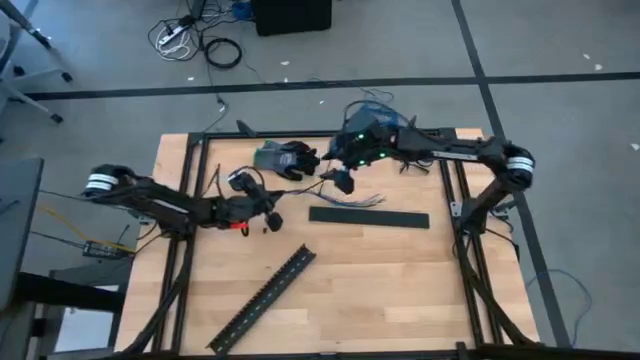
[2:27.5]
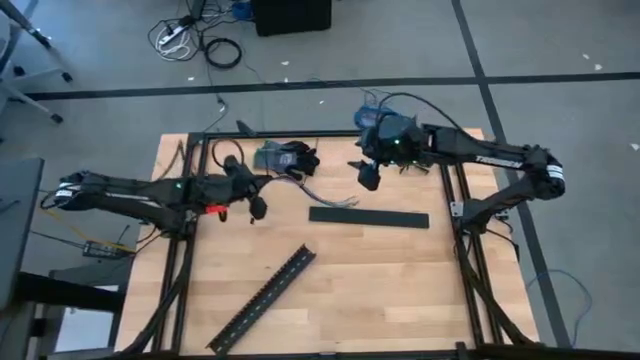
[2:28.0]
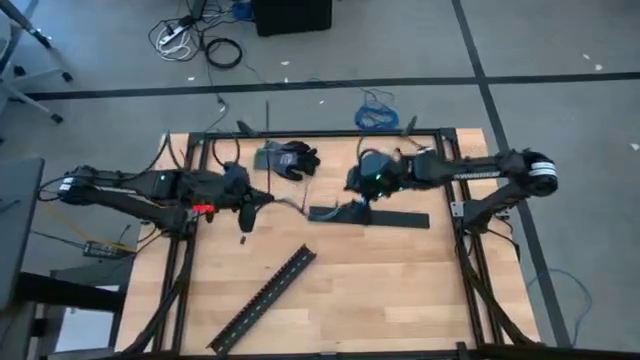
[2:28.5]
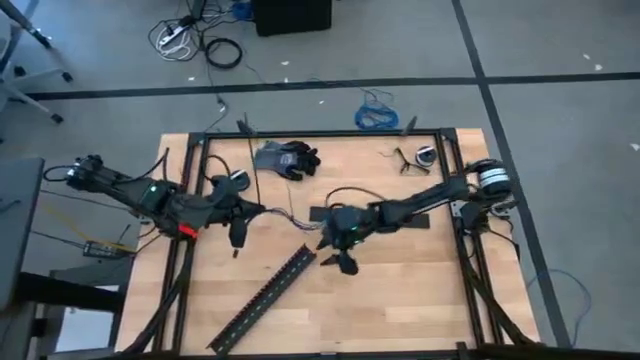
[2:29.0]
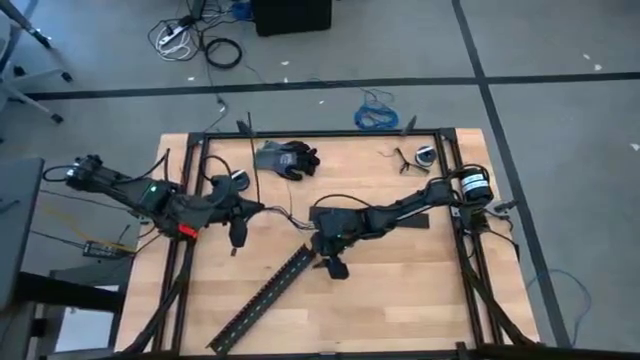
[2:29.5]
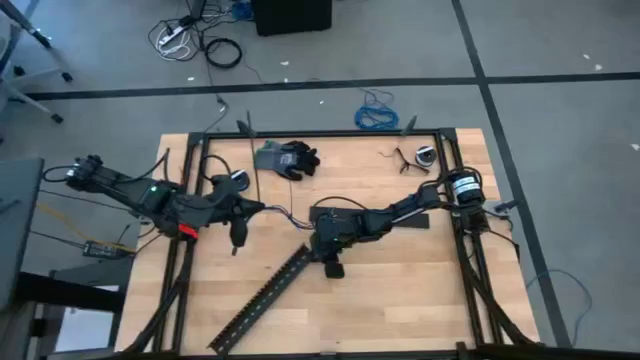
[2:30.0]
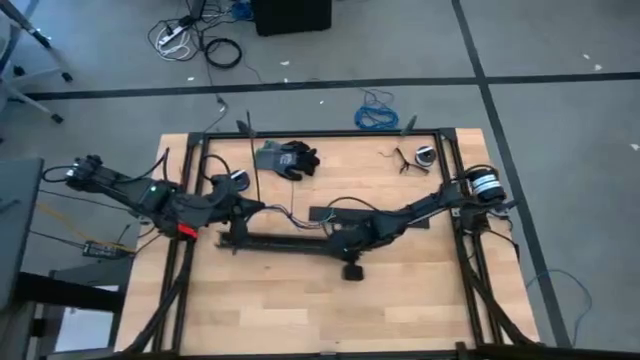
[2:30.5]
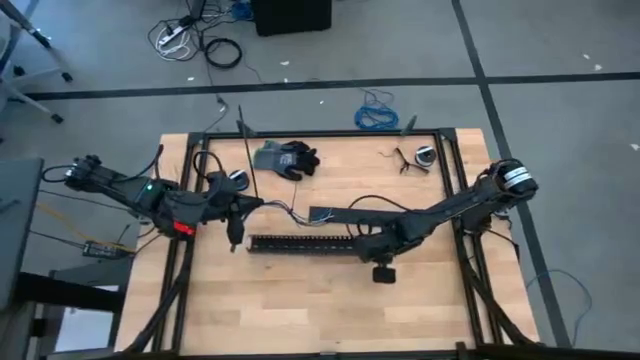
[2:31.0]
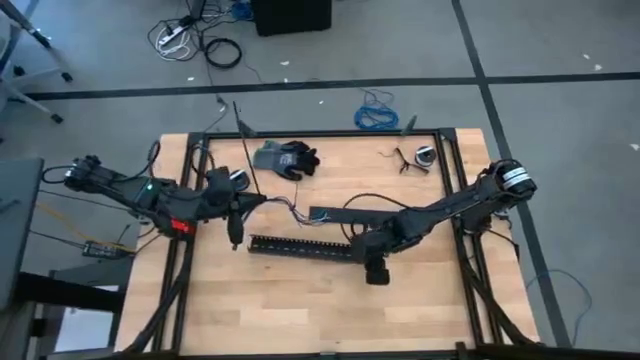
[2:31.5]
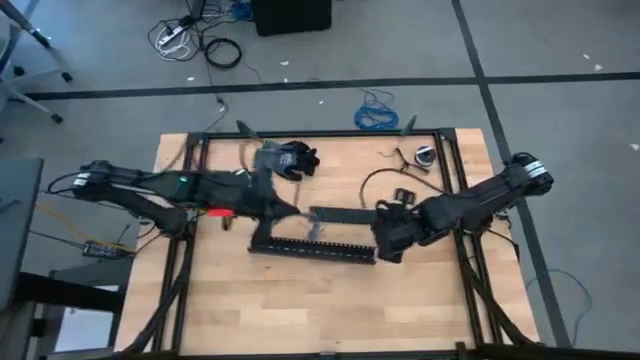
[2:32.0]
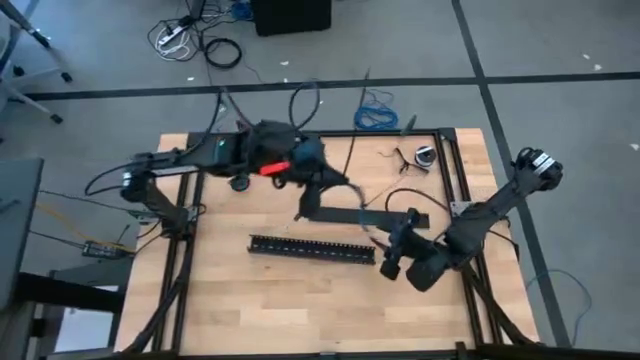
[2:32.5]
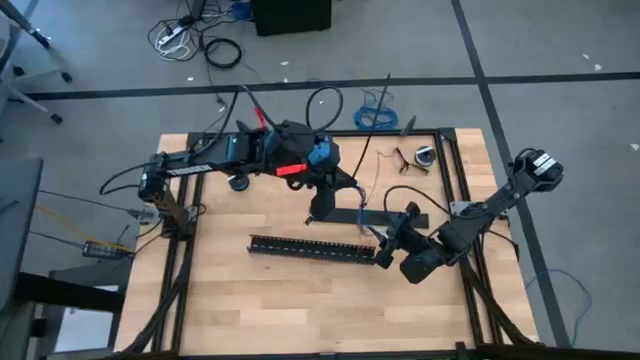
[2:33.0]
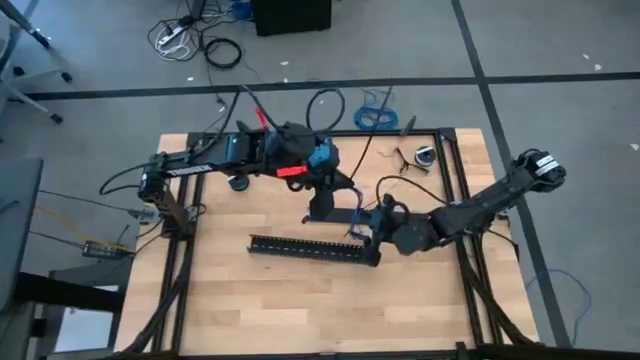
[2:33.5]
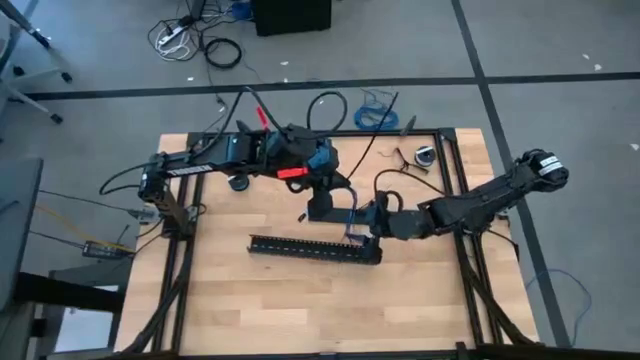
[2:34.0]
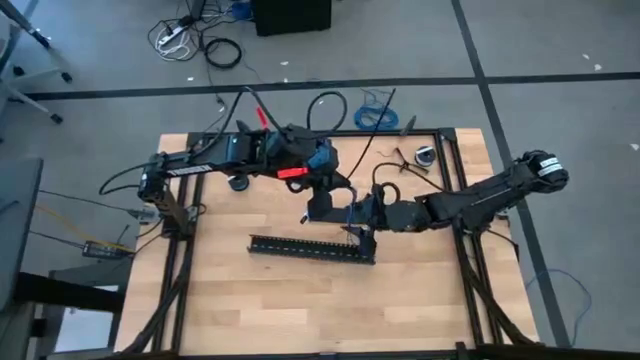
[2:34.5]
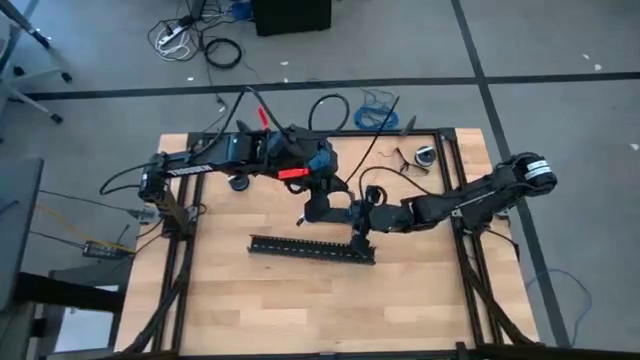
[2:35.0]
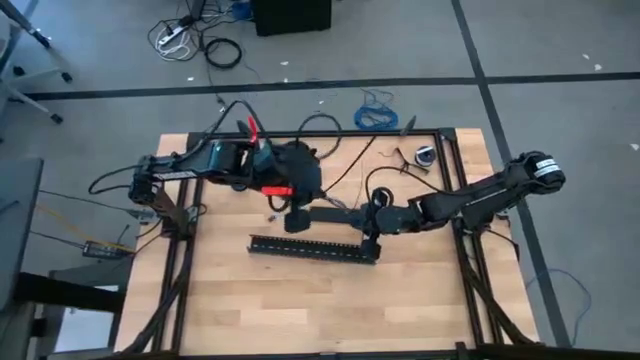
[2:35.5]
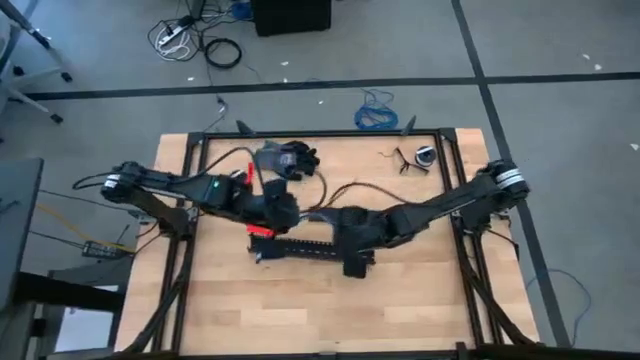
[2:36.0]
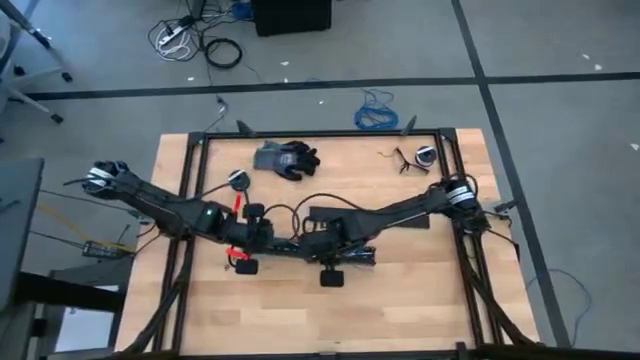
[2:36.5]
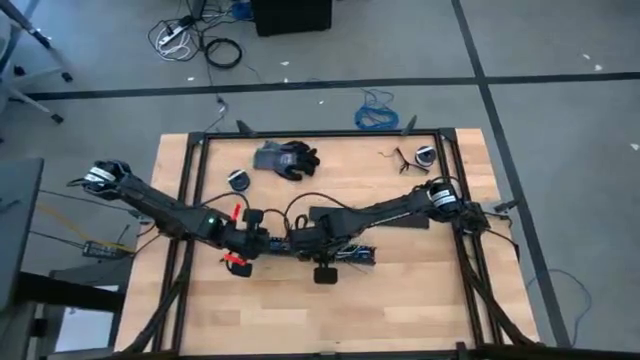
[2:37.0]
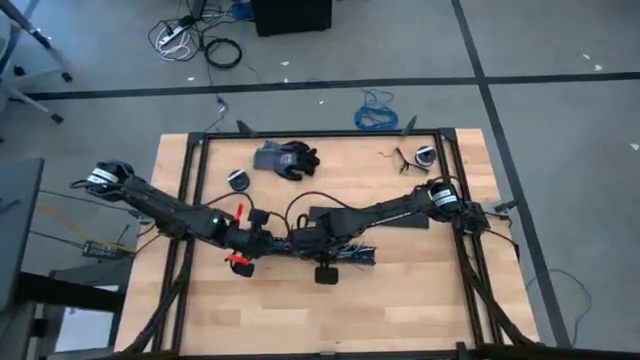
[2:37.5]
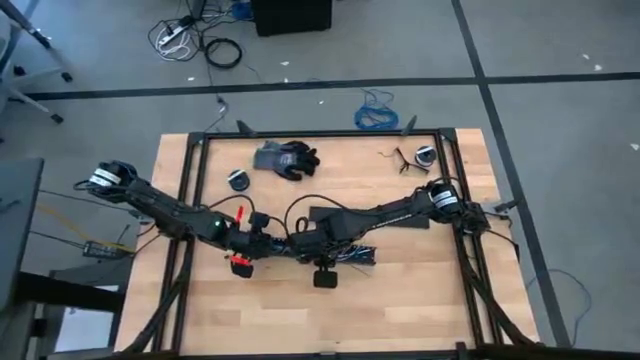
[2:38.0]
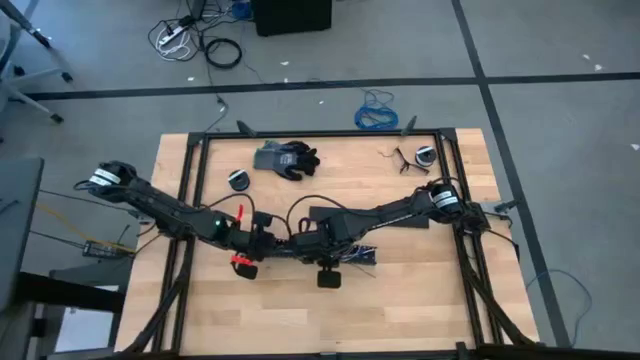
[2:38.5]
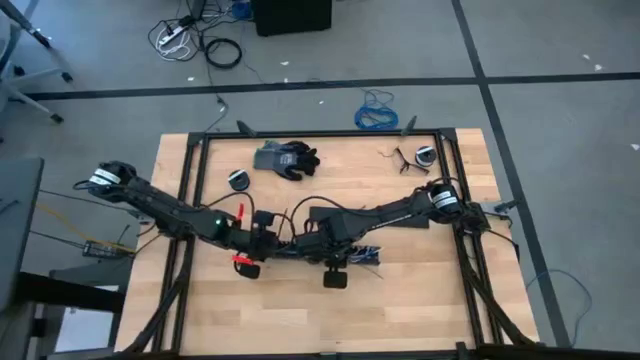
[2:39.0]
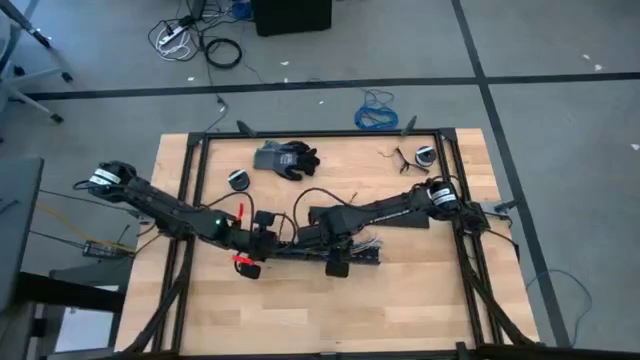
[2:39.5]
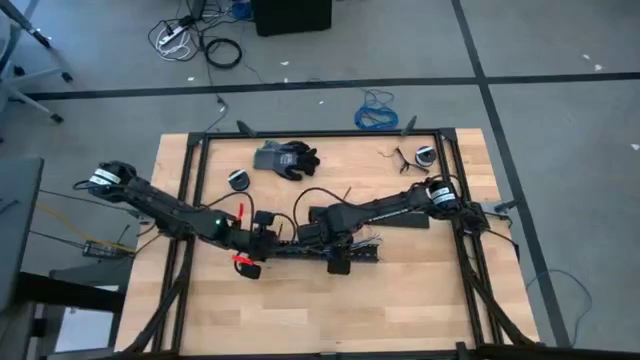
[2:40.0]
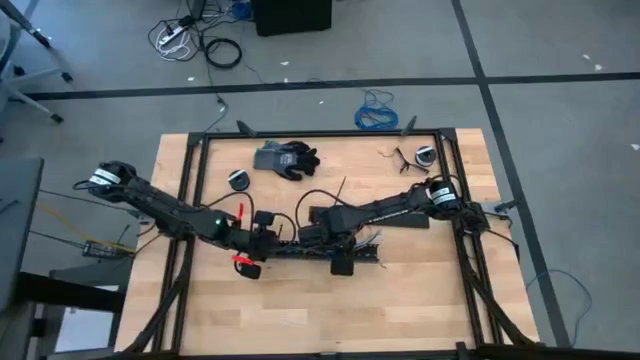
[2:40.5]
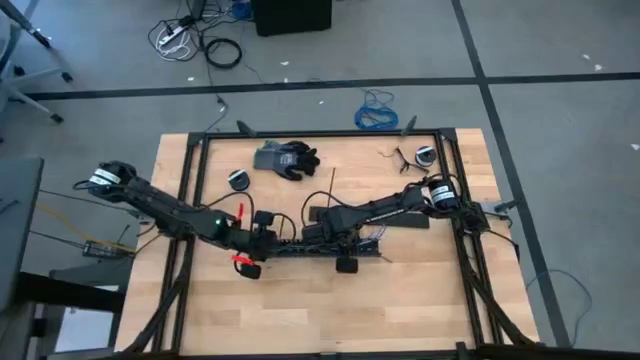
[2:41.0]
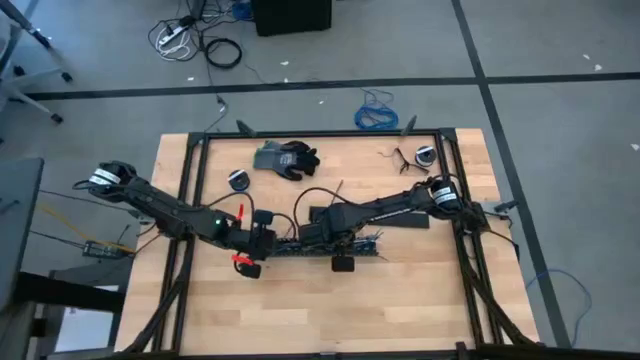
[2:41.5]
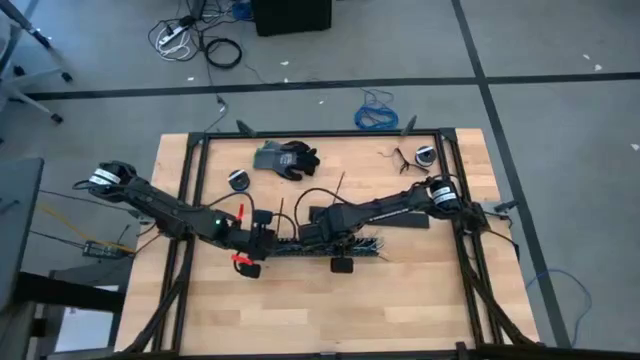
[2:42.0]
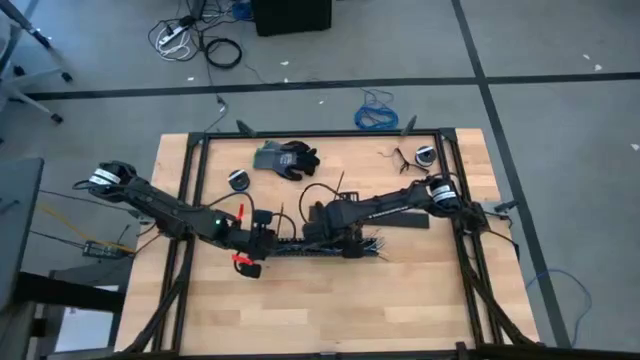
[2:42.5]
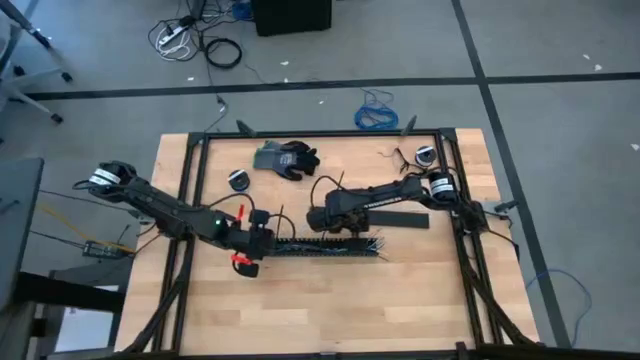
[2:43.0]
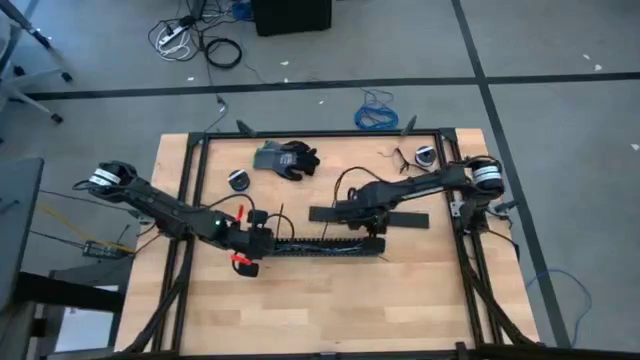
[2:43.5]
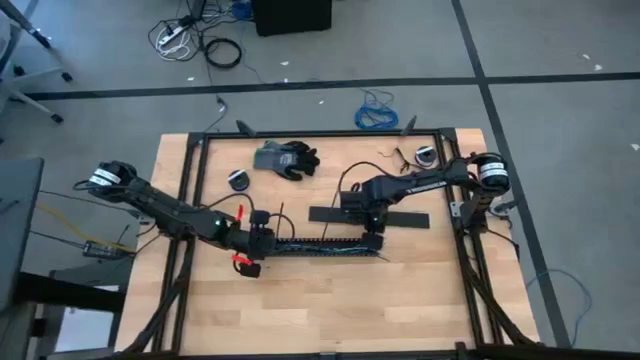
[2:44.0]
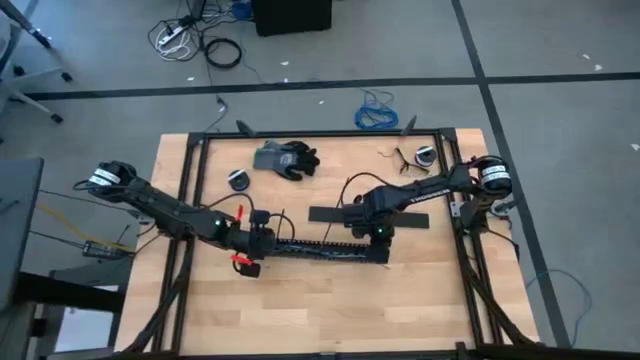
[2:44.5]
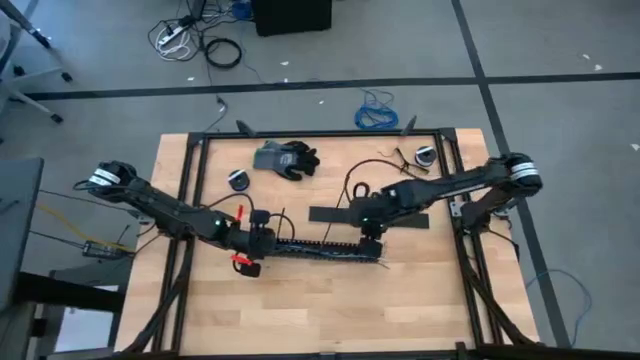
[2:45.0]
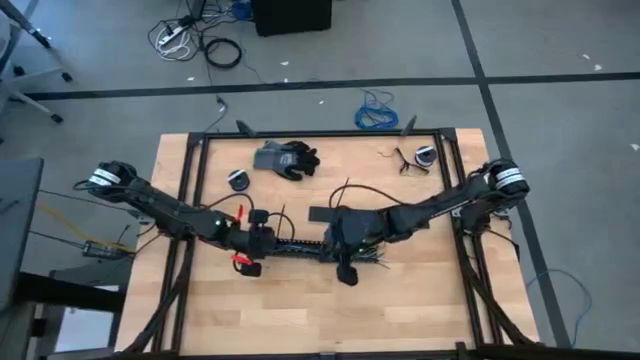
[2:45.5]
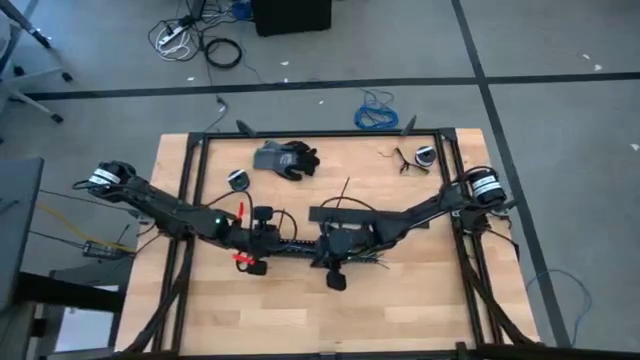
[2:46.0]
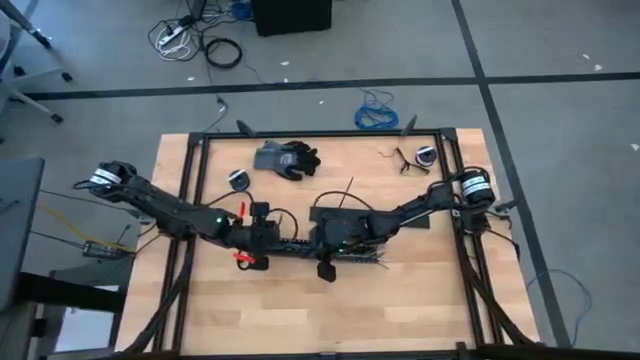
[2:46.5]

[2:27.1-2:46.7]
Task: Ziptie cables
Put the cable wires in the black cable duct

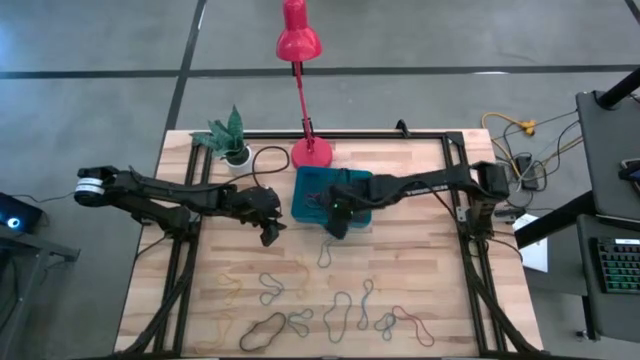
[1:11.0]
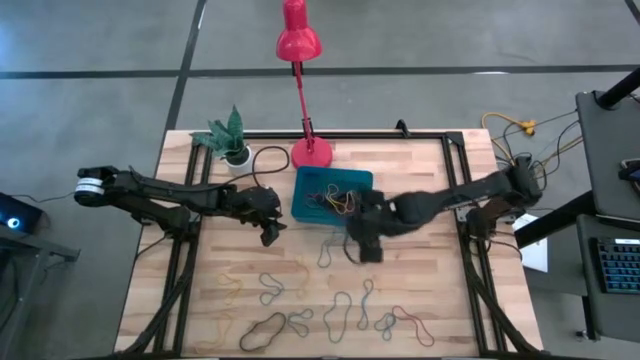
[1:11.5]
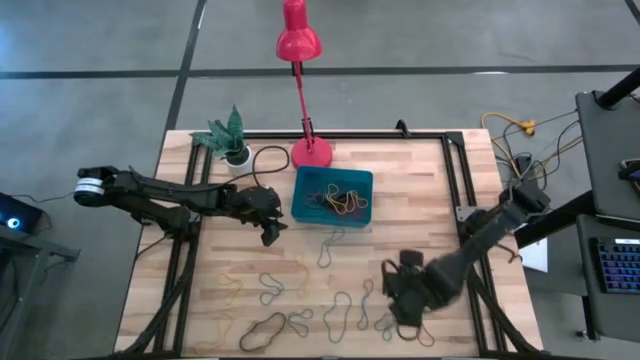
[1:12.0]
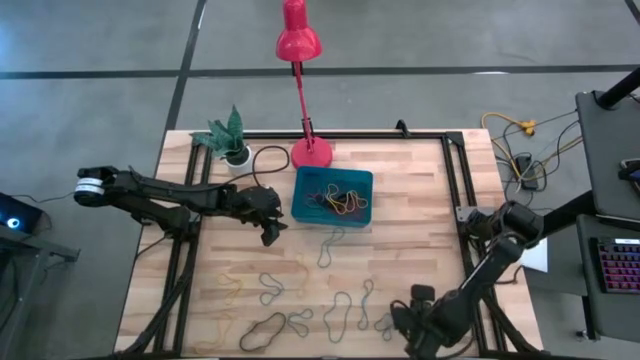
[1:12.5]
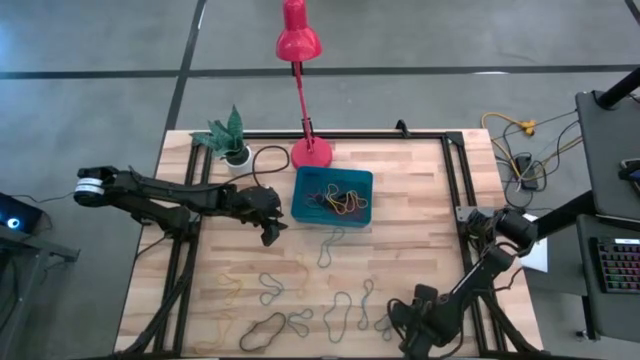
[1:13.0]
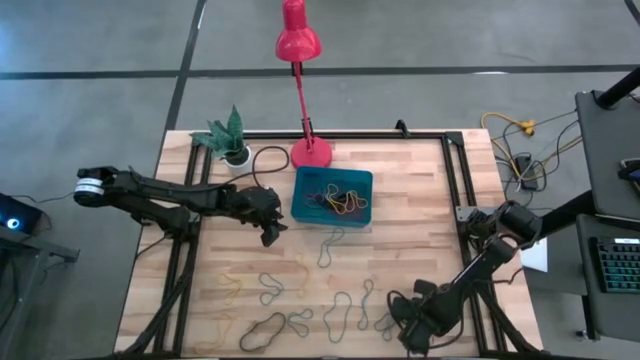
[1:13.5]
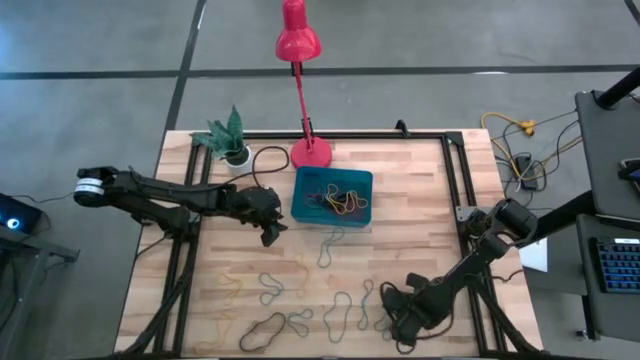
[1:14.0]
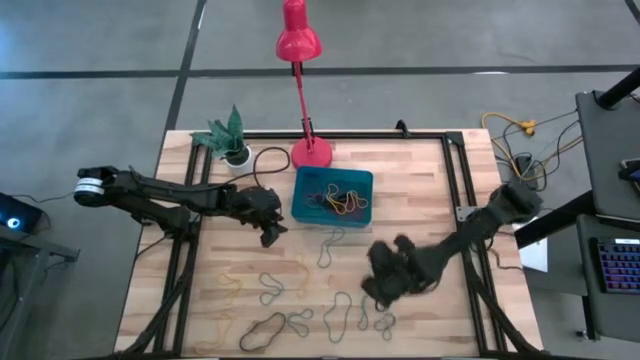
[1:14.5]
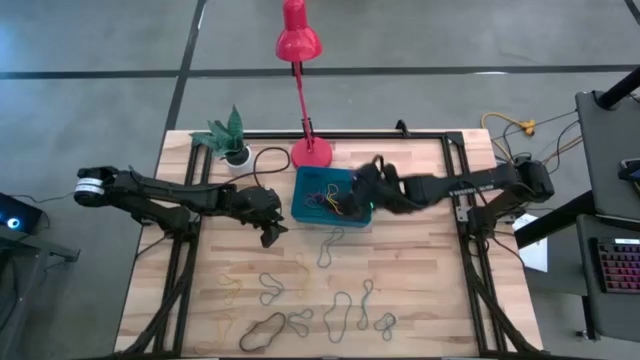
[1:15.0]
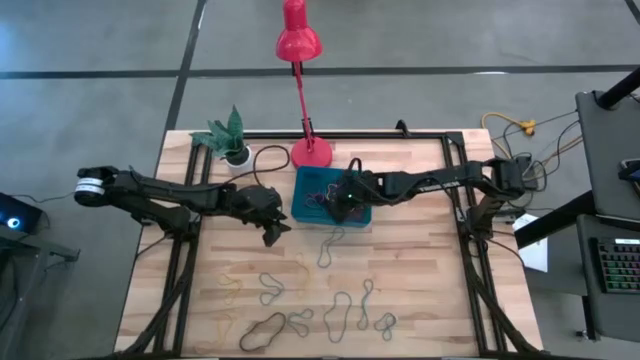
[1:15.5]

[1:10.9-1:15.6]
Task: Pick and place rubber bands into bin
Put the red rubber band into the blue bin
